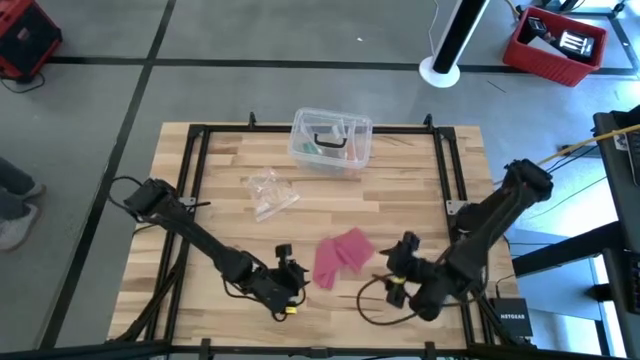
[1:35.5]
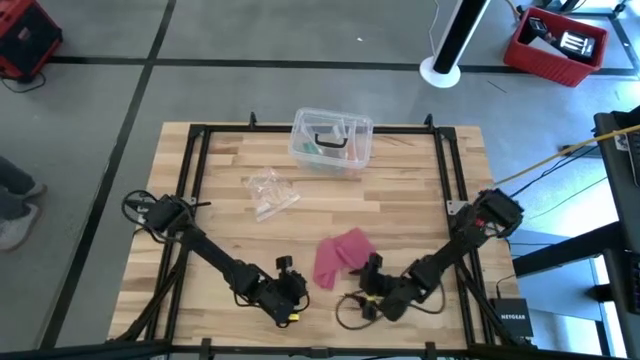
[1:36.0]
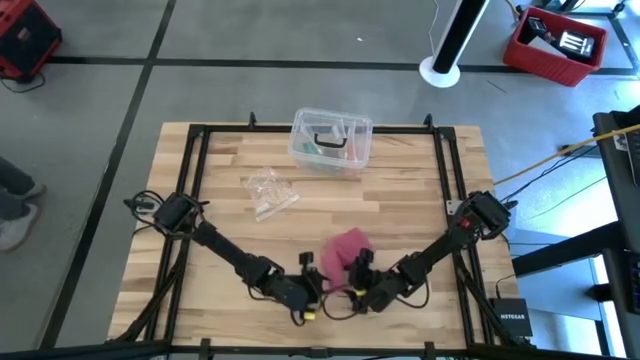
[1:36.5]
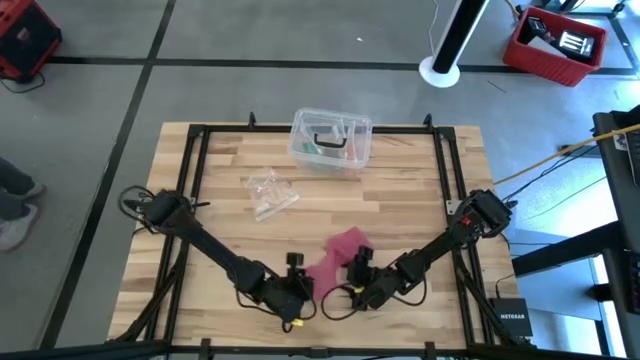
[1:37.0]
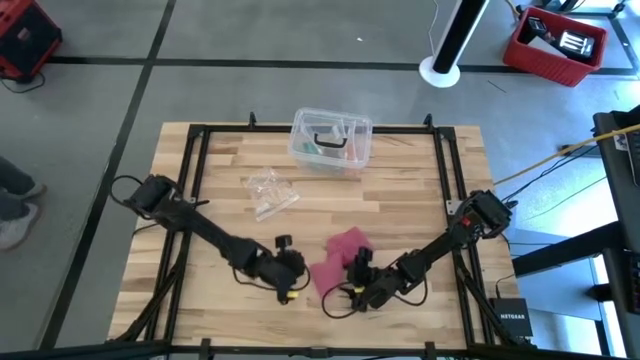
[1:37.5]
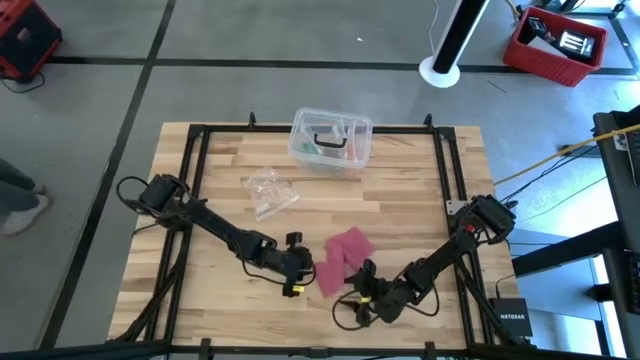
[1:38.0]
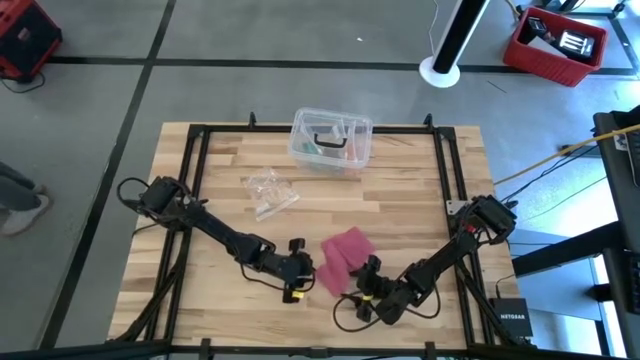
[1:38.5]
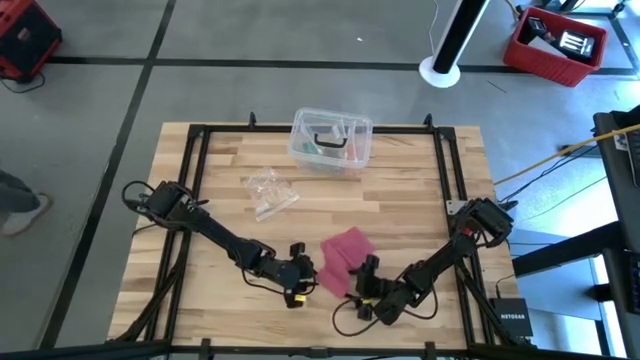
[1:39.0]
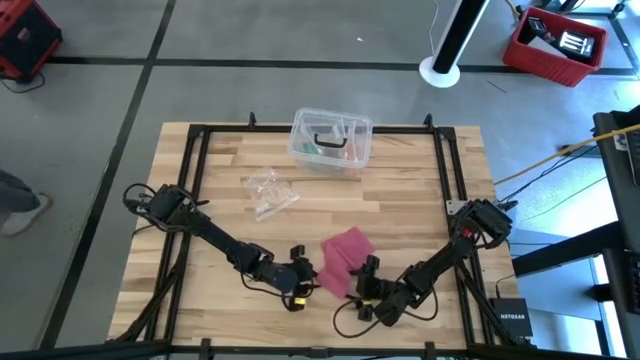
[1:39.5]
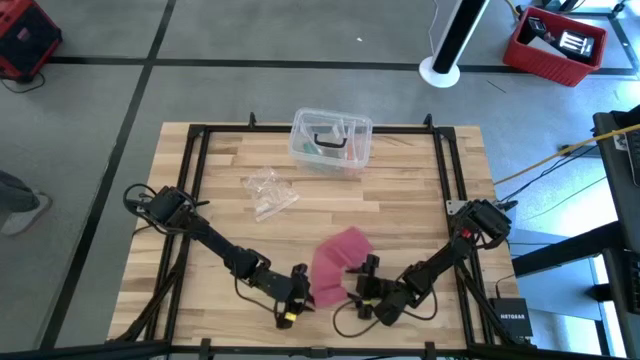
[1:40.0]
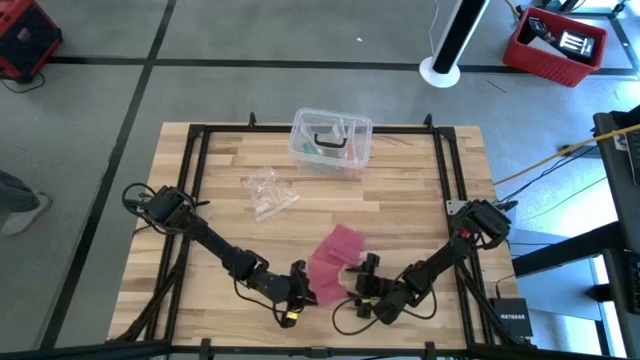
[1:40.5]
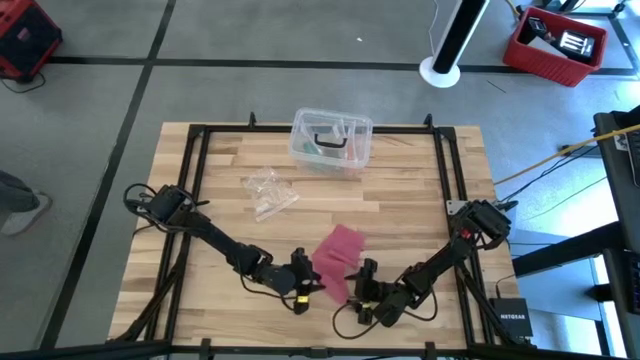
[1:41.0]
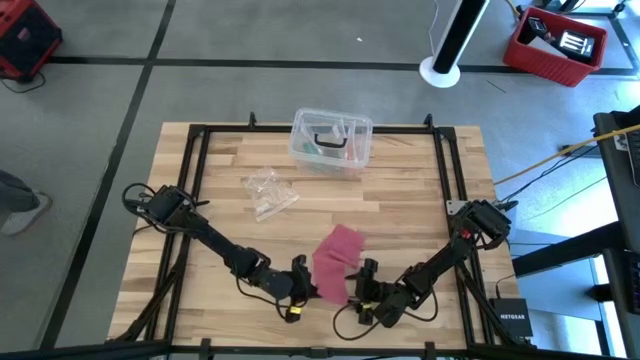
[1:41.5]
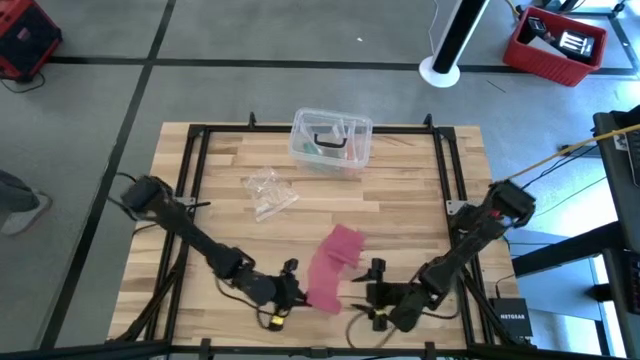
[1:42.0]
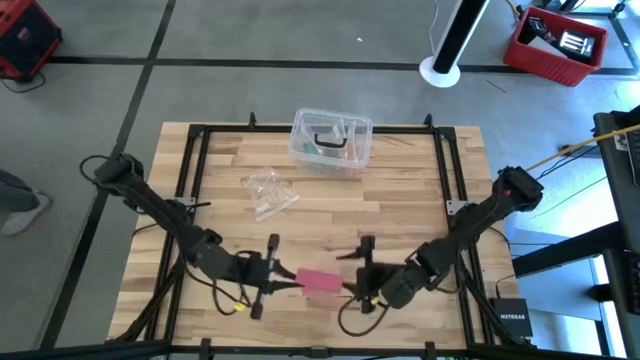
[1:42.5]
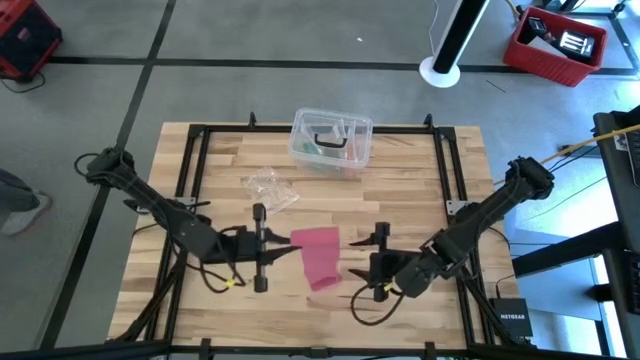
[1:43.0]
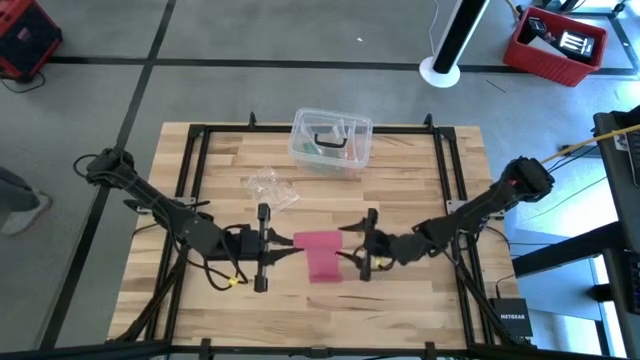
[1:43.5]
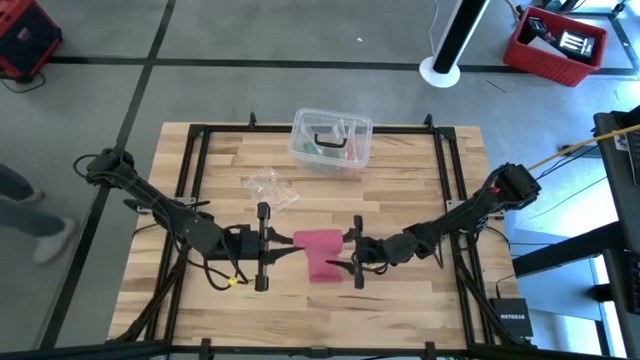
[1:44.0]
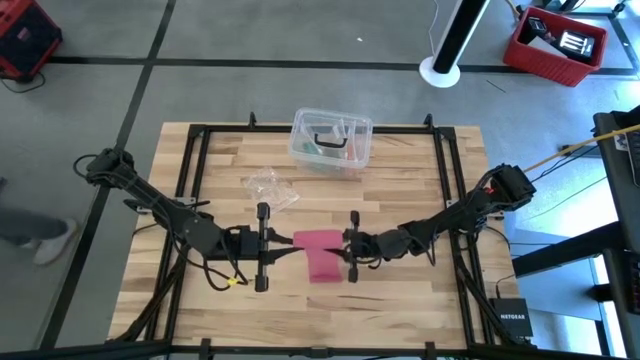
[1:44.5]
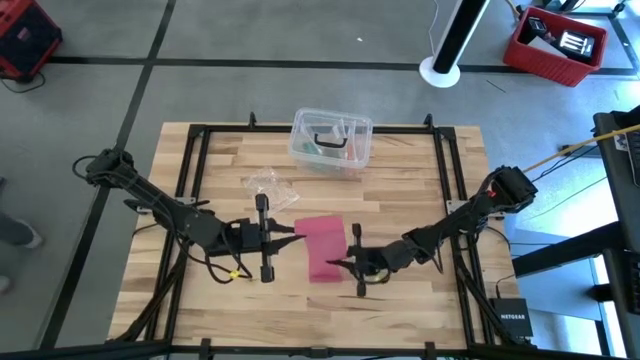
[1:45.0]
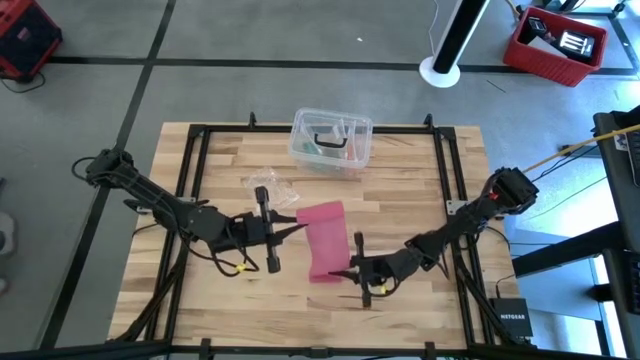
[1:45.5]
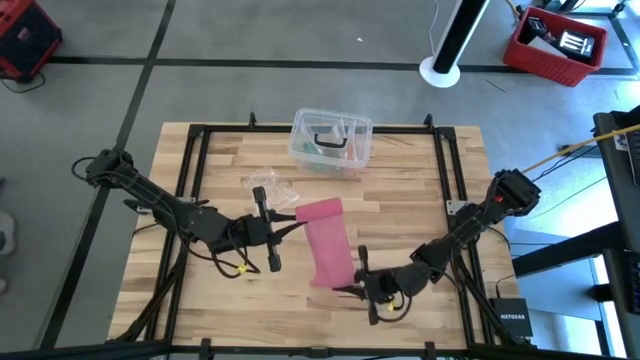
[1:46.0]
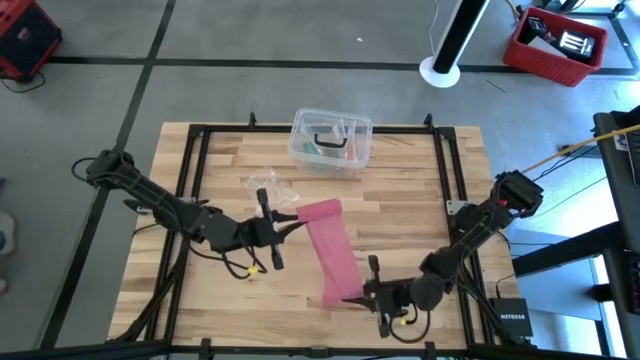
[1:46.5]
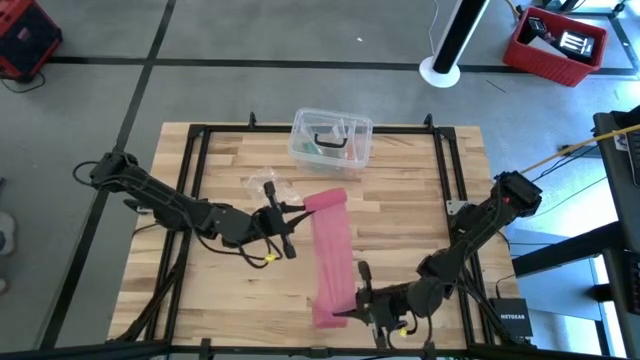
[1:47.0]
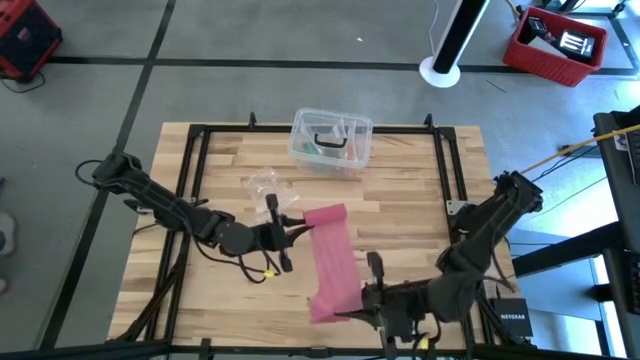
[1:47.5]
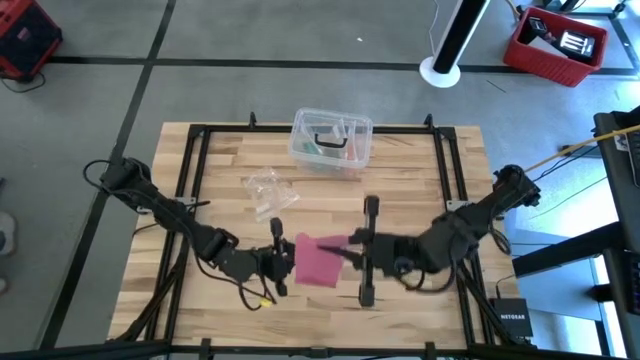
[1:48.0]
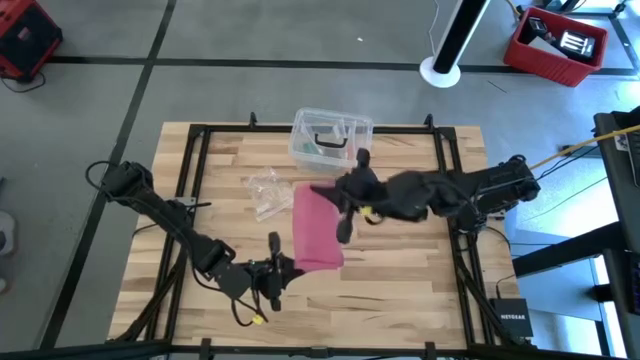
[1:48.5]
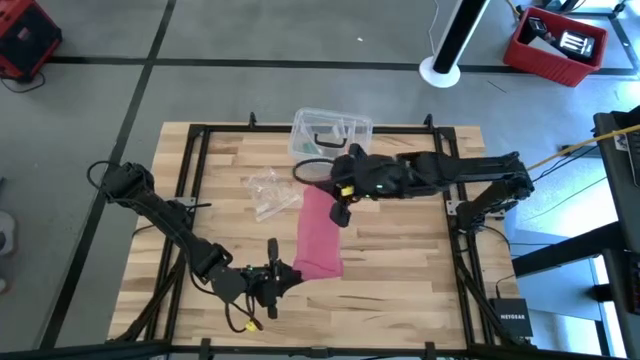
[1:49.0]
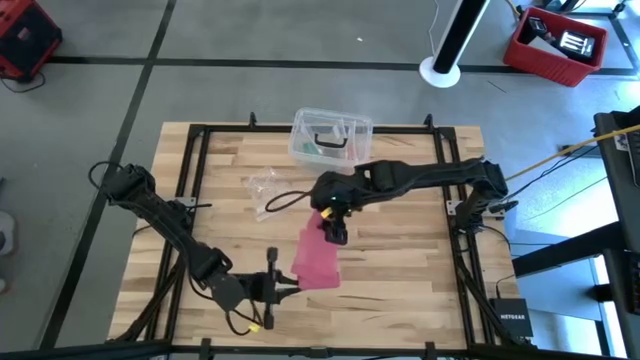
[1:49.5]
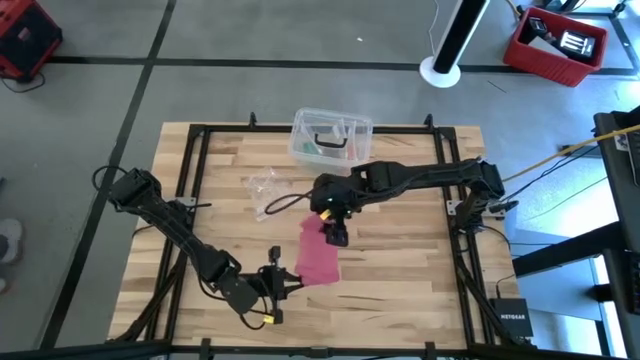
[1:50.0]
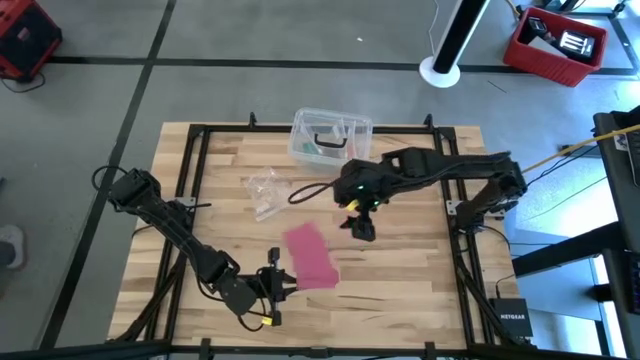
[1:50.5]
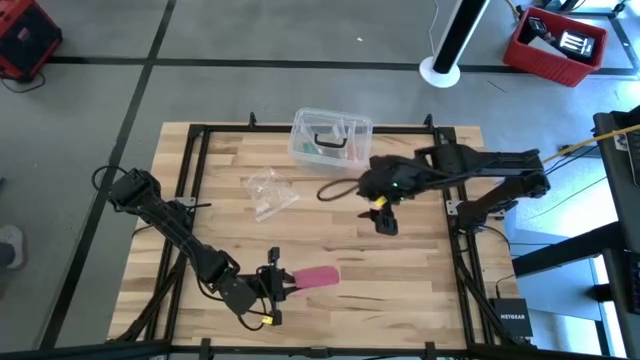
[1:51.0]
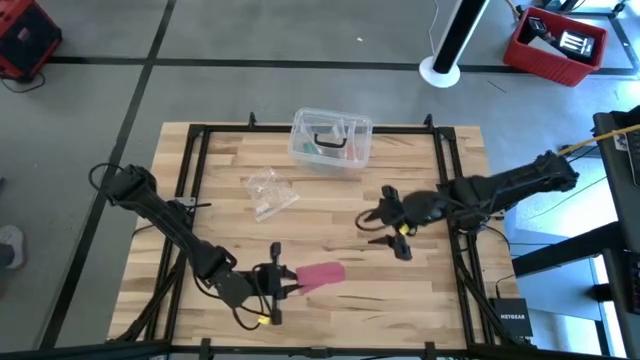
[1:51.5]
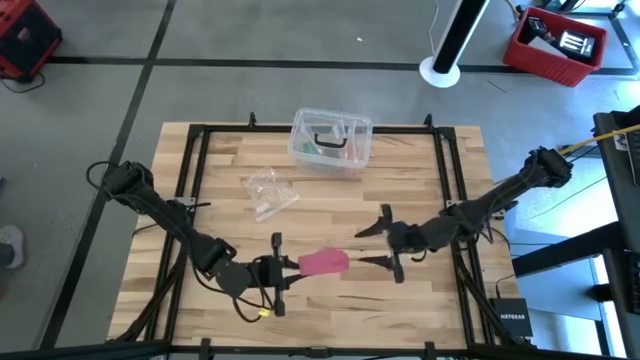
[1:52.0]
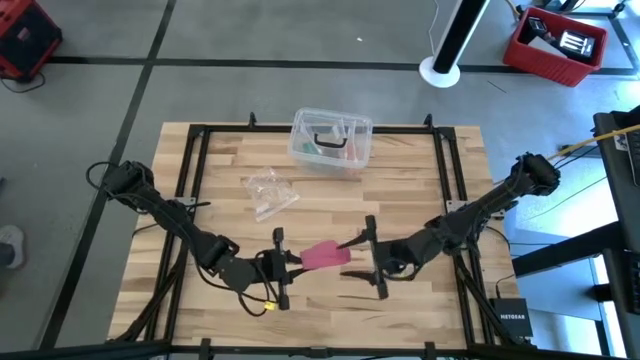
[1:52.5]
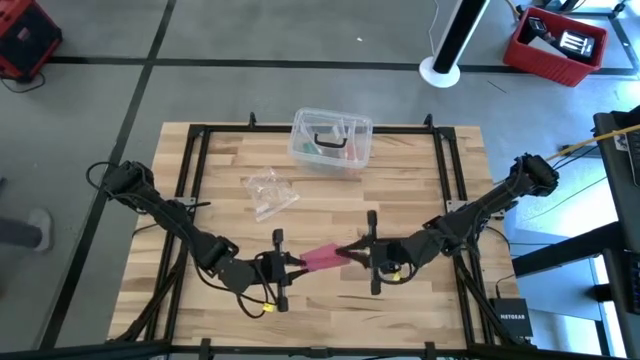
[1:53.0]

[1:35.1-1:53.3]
Task: Roll bandage
Roll the pink bandage

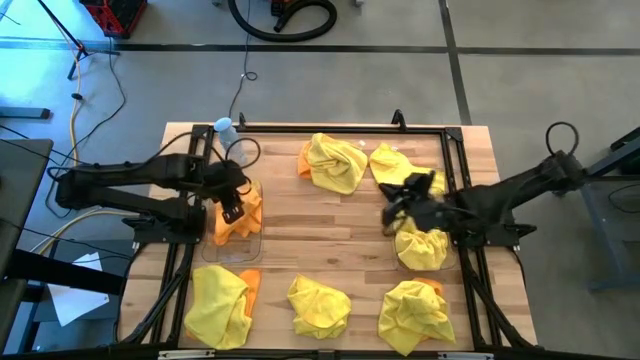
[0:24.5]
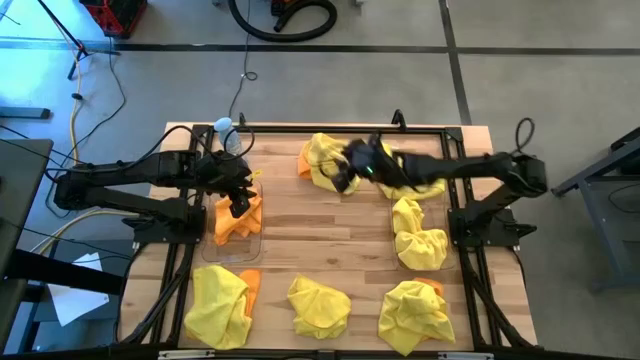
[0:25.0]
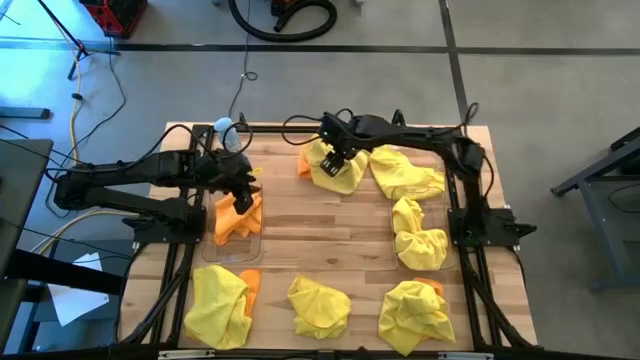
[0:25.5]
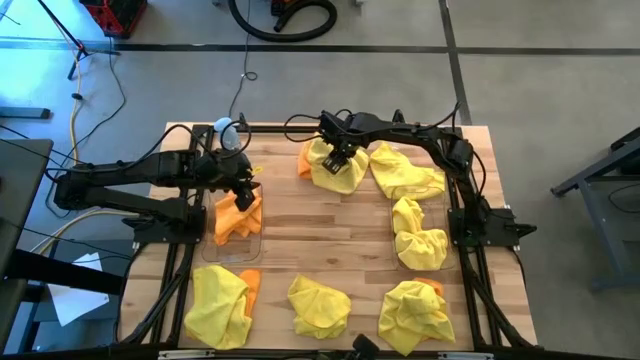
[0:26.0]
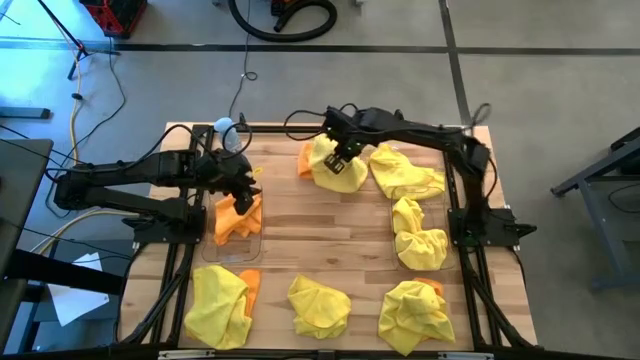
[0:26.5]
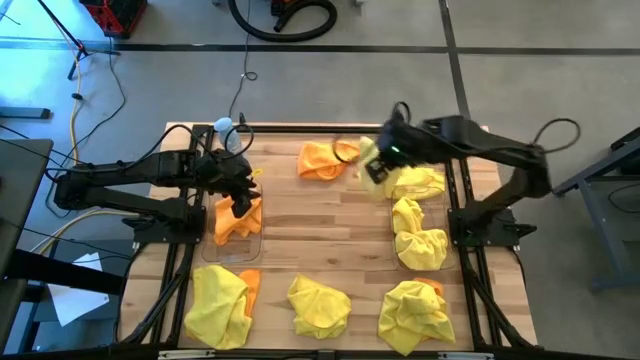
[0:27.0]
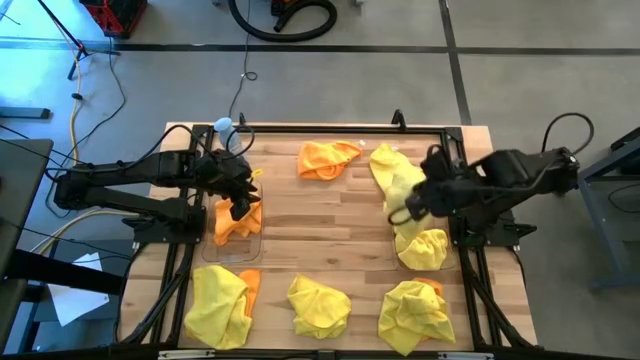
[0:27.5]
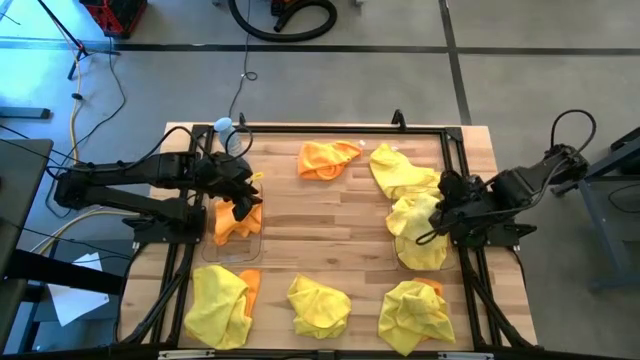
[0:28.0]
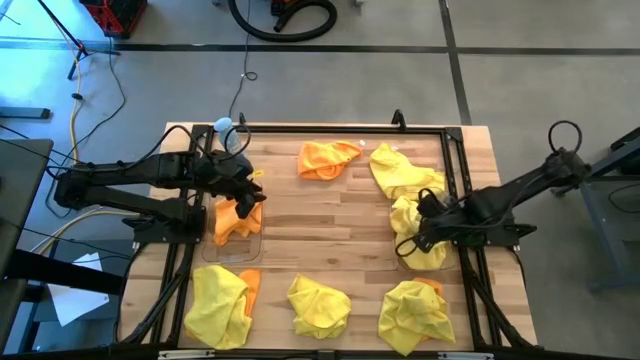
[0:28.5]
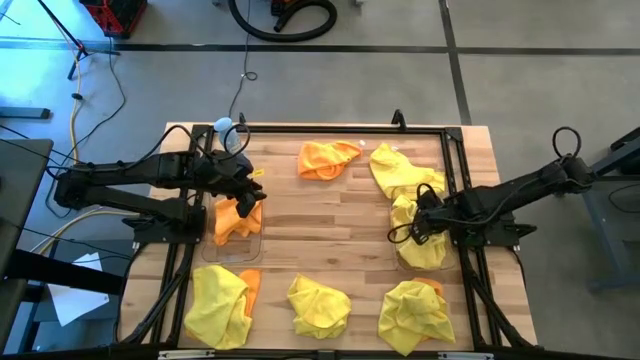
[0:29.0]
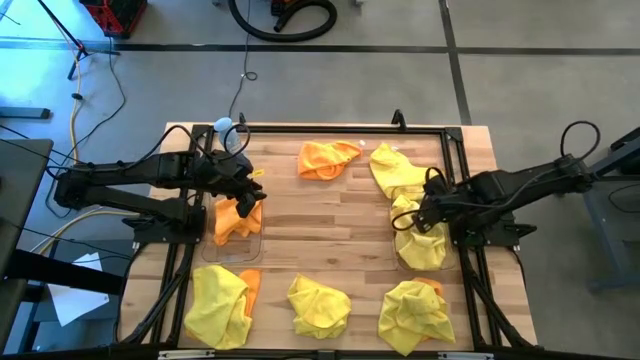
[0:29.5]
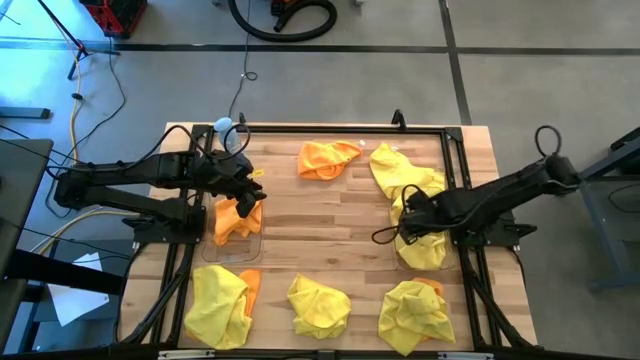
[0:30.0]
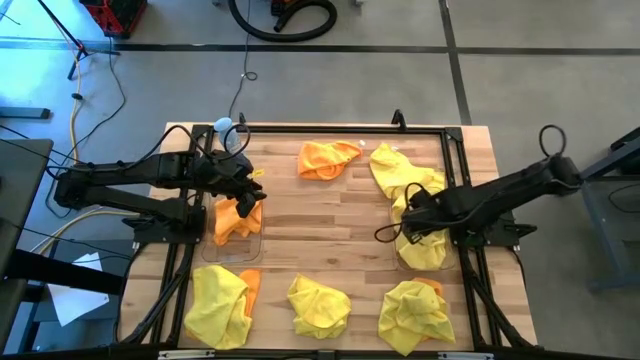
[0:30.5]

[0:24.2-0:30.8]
Task: Sort microfiber towel by color & place in baskets
Put the yellow towel into the right transparent bin
